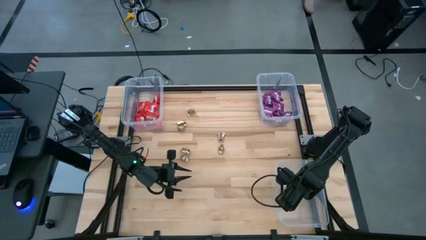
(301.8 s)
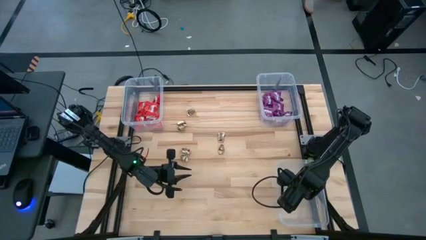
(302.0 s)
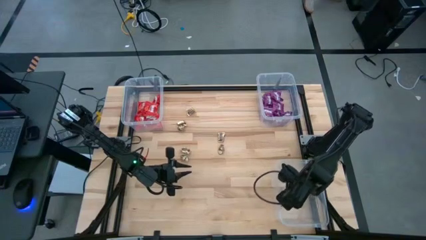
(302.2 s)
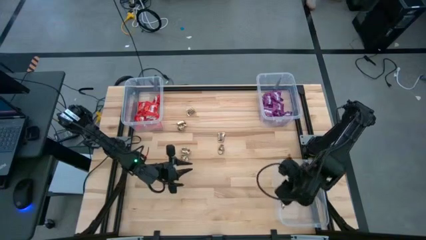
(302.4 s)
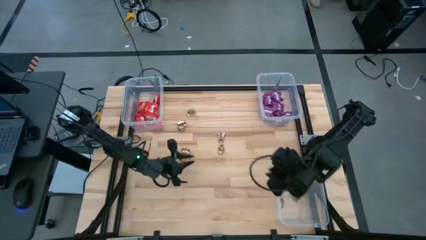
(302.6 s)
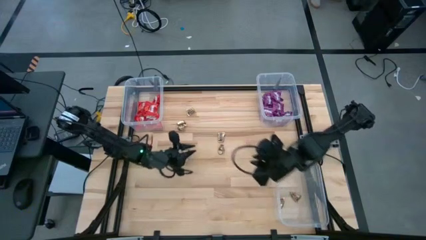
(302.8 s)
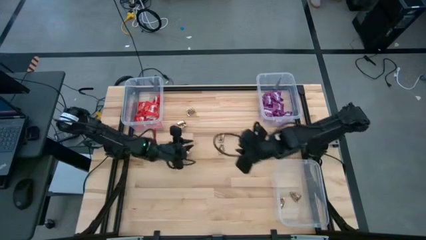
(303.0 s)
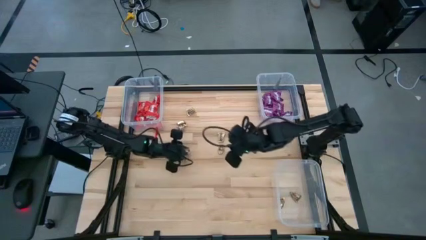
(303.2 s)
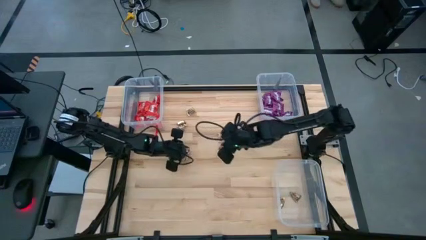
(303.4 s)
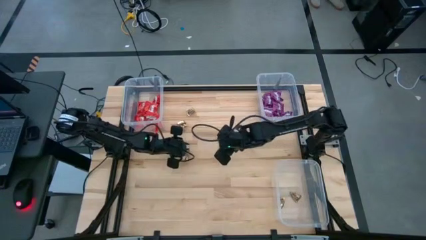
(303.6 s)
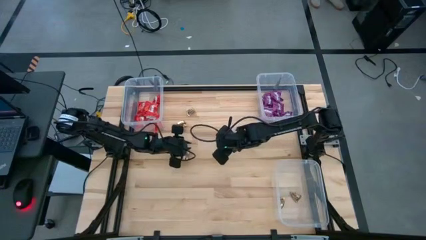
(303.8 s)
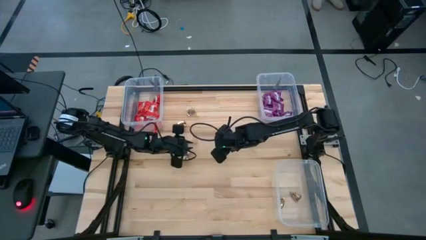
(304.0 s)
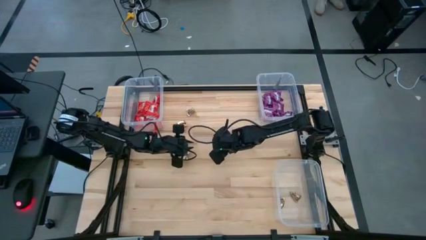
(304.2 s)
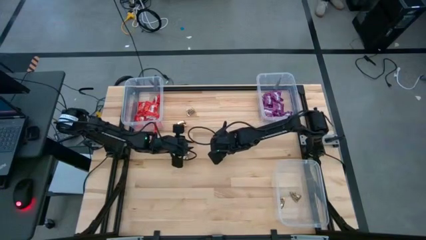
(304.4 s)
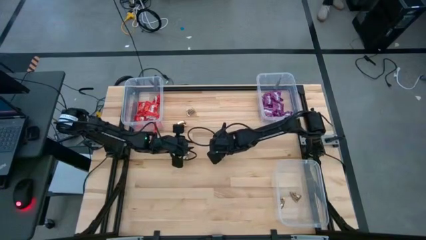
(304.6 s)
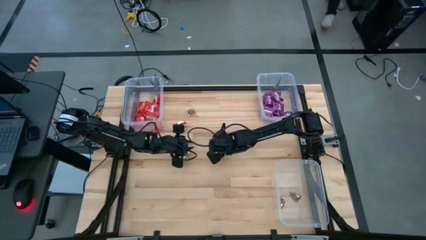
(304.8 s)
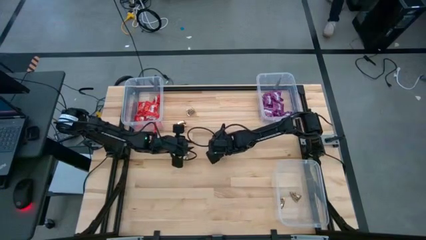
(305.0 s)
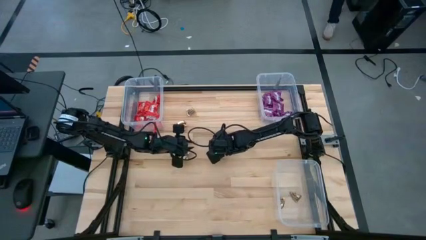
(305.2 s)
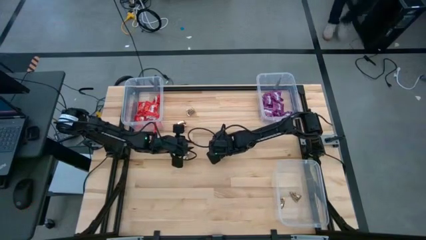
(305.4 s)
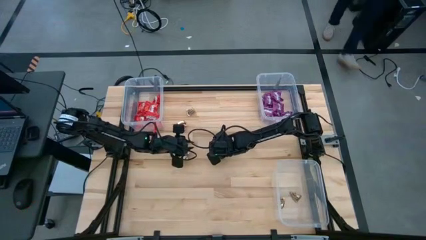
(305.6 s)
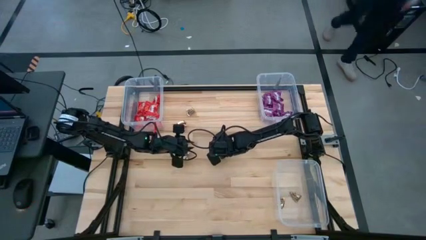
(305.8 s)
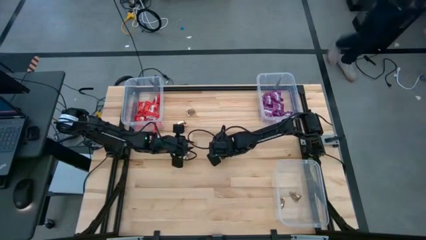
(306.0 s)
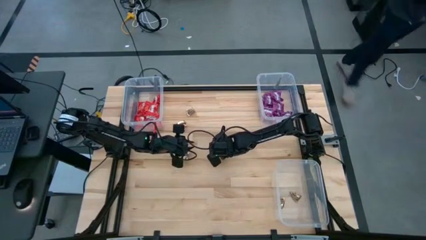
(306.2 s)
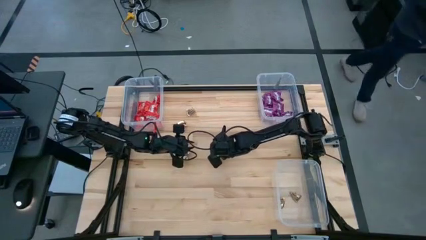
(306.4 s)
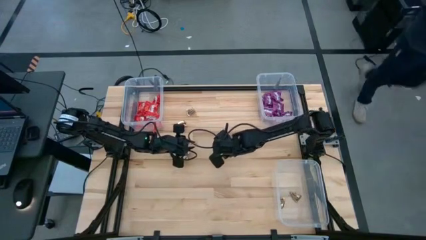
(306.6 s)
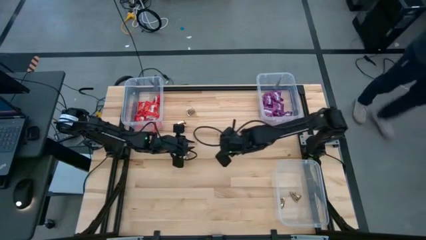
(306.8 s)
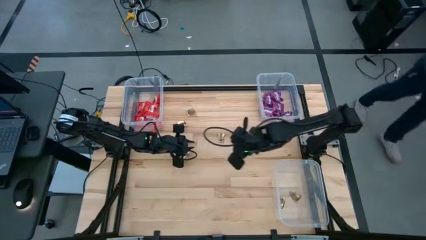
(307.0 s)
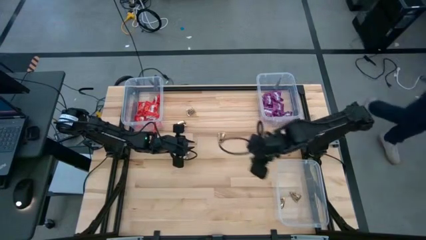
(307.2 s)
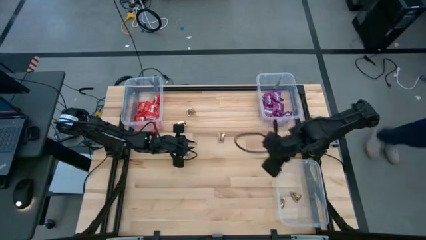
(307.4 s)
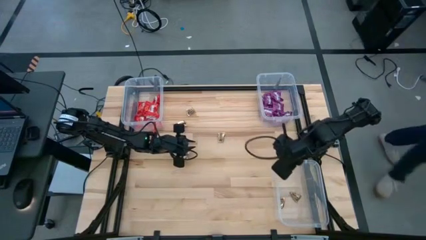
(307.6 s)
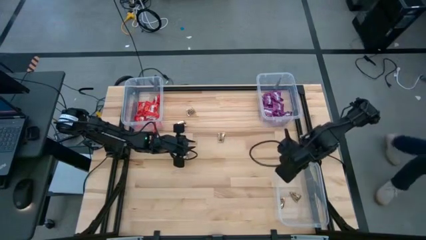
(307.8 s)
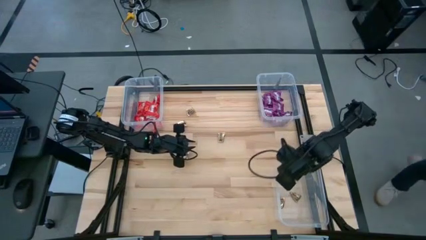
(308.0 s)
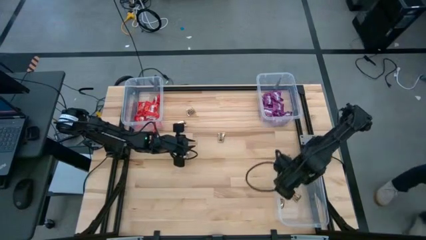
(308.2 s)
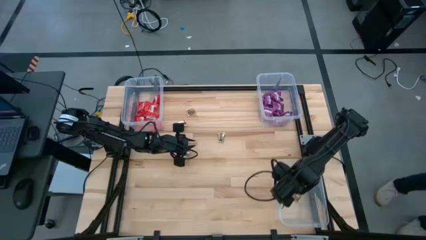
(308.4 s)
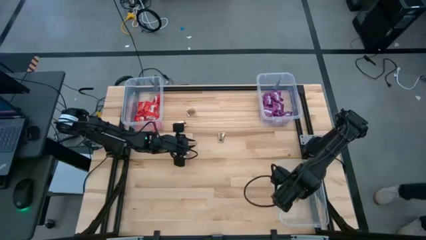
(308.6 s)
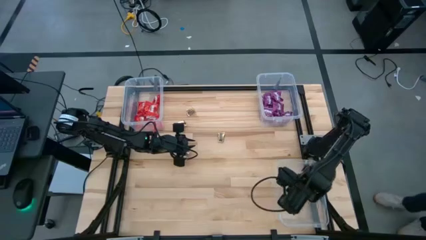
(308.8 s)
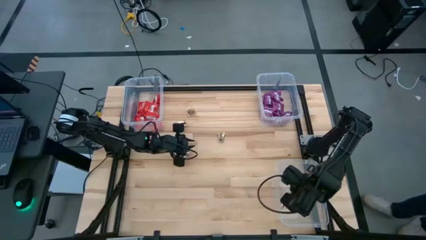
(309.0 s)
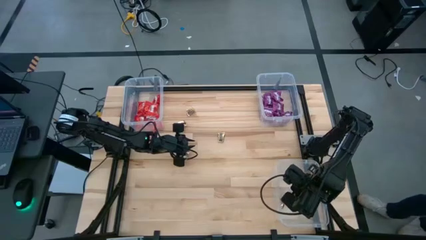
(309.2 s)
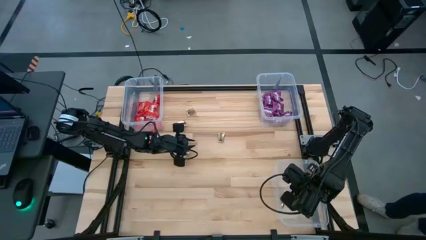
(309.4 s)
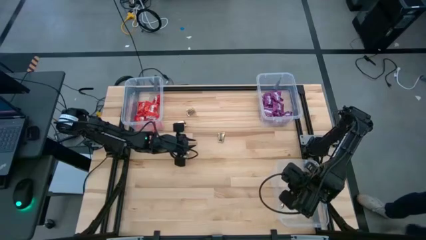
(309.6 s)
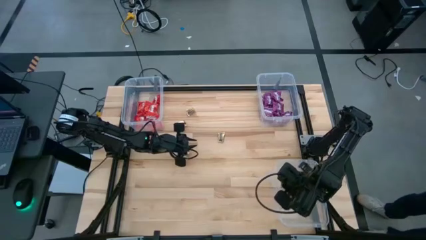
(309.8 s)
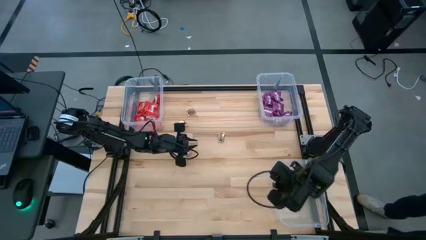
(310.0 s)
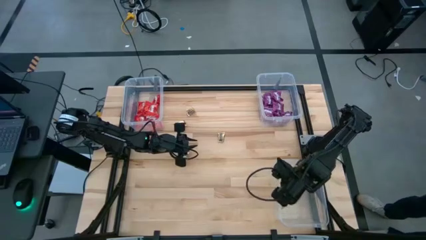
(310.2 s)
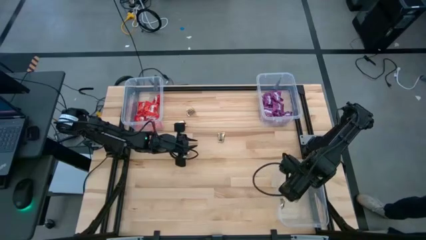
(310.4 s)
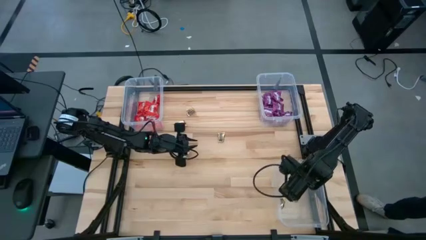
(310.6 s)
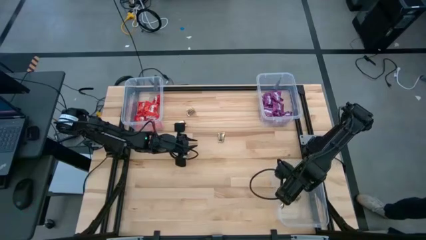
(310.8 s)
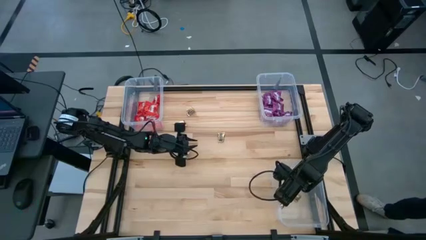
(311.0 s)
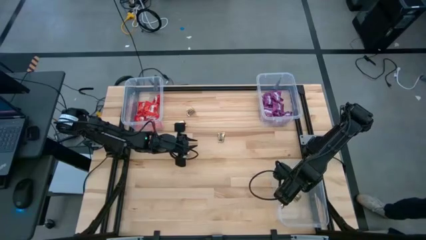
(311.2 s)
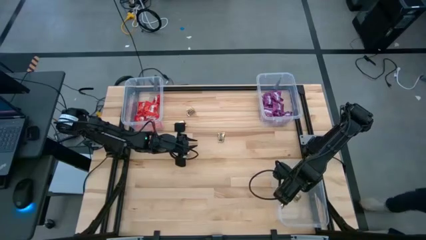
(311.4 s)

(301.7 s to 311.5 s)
Task: Sort candy
Put the yellow candy into the bottom right transparent bin

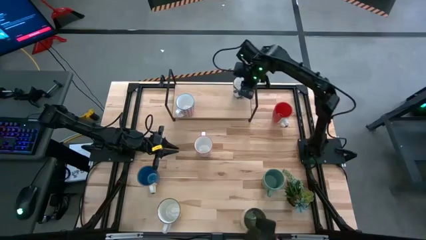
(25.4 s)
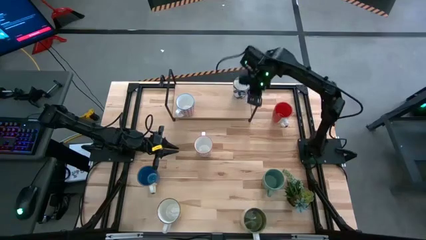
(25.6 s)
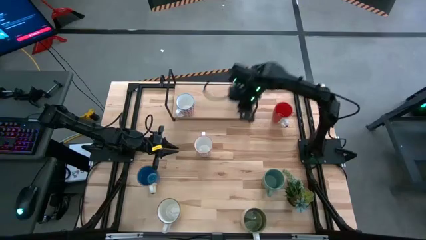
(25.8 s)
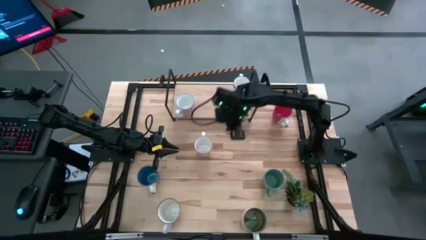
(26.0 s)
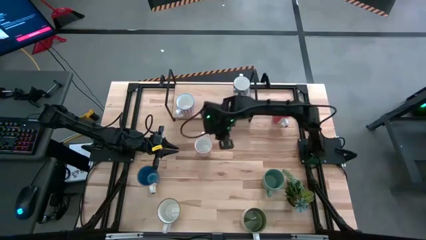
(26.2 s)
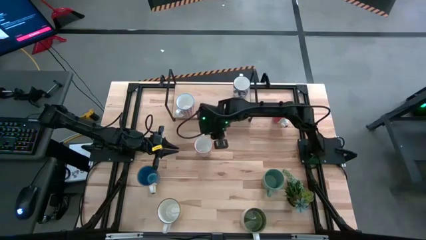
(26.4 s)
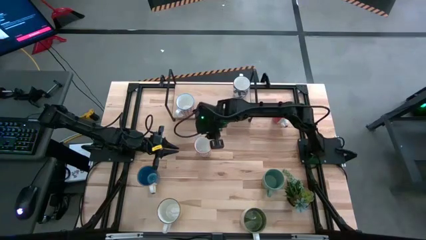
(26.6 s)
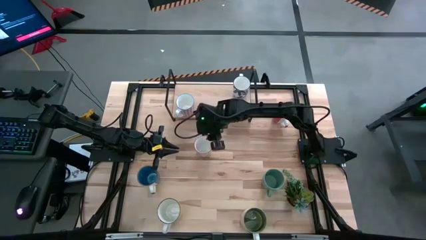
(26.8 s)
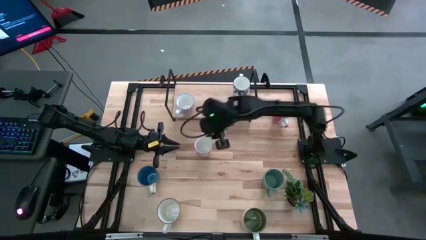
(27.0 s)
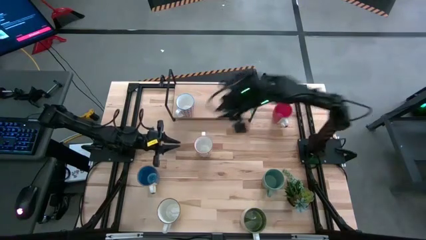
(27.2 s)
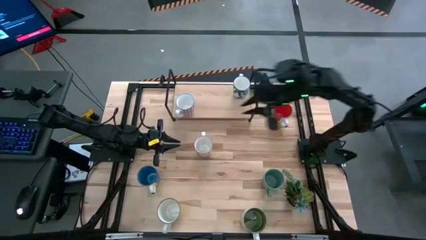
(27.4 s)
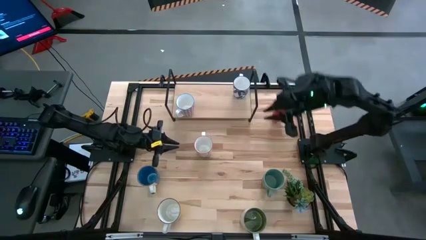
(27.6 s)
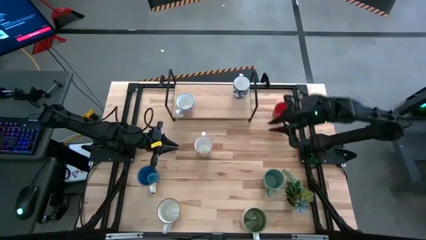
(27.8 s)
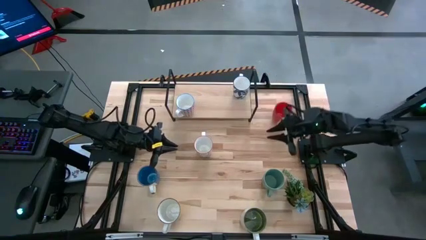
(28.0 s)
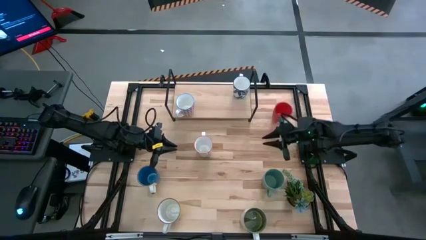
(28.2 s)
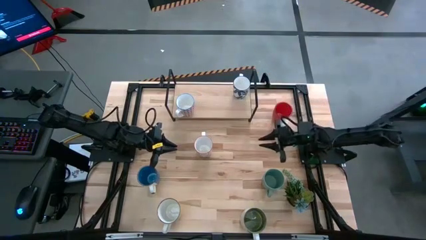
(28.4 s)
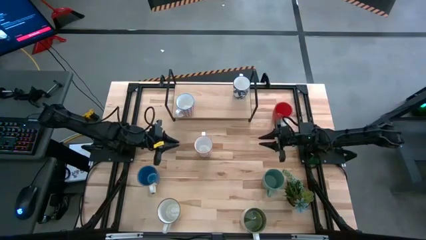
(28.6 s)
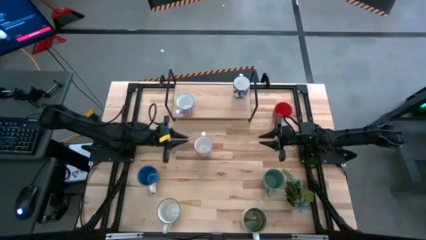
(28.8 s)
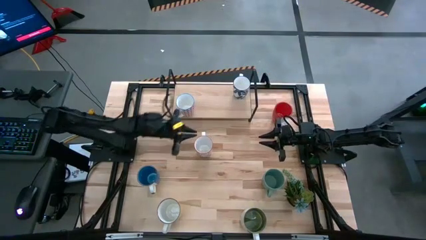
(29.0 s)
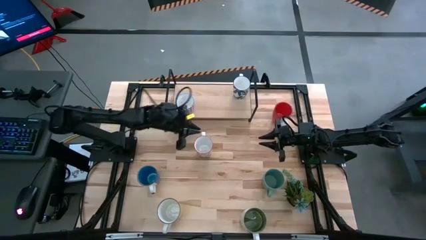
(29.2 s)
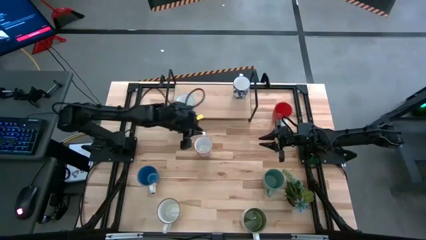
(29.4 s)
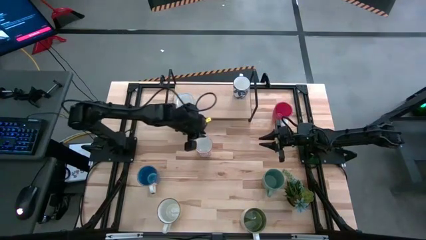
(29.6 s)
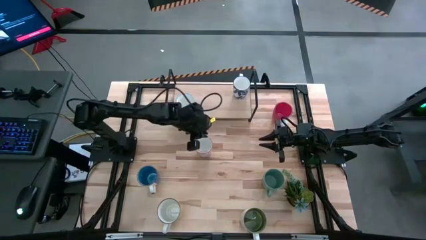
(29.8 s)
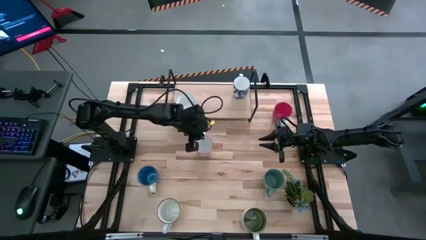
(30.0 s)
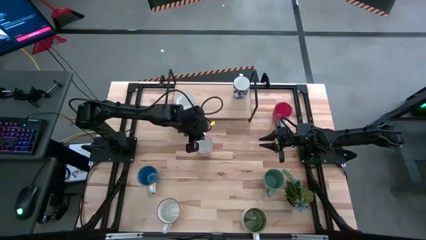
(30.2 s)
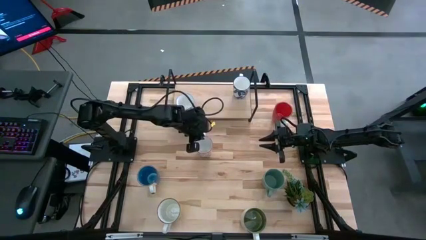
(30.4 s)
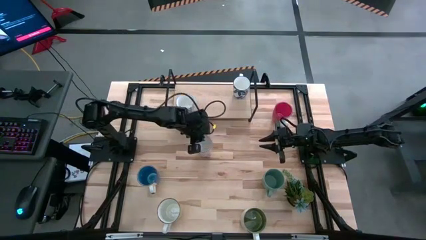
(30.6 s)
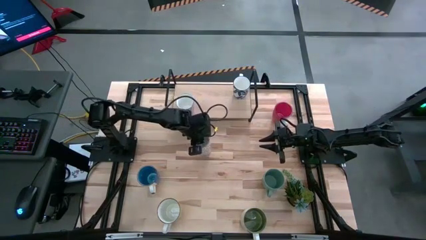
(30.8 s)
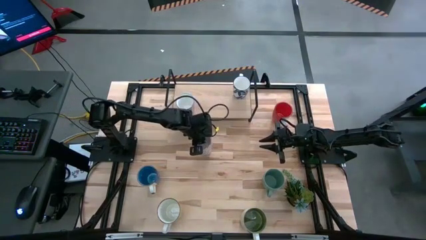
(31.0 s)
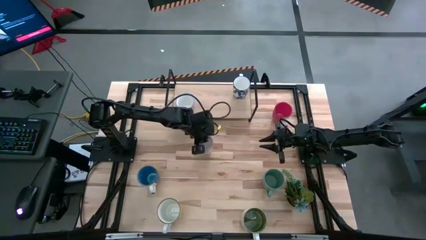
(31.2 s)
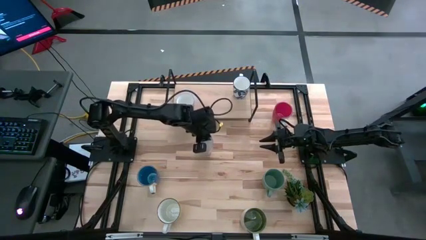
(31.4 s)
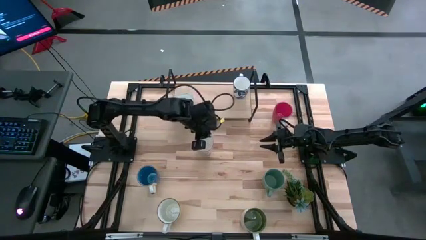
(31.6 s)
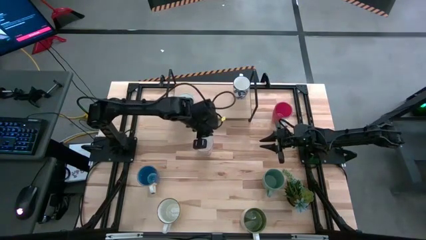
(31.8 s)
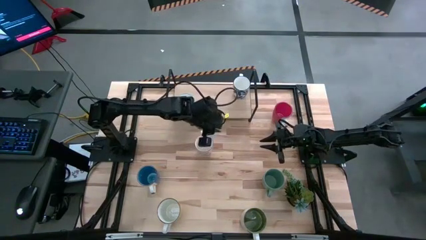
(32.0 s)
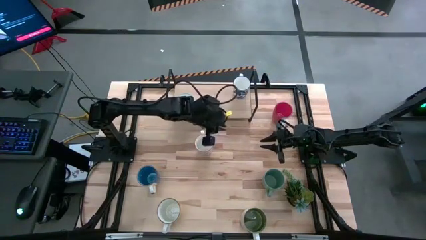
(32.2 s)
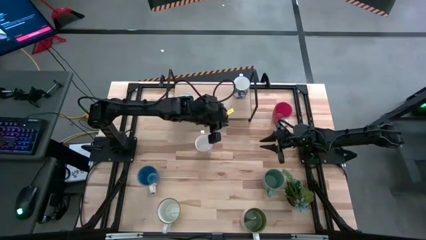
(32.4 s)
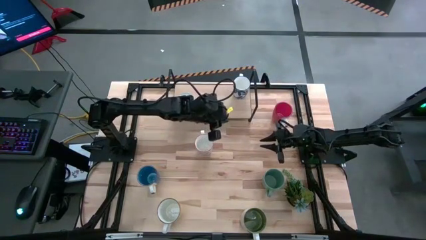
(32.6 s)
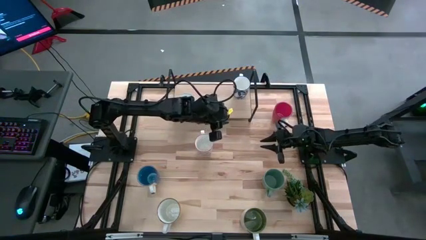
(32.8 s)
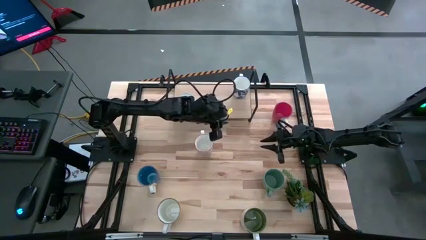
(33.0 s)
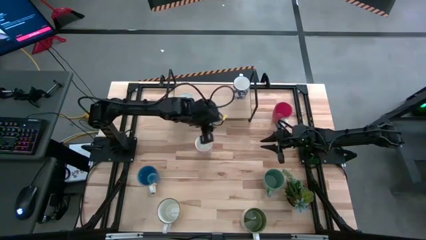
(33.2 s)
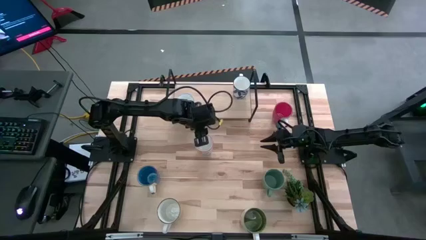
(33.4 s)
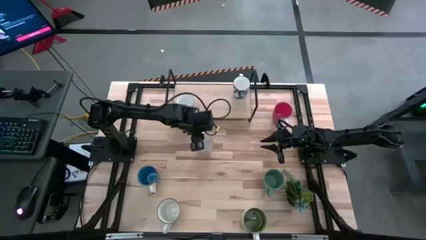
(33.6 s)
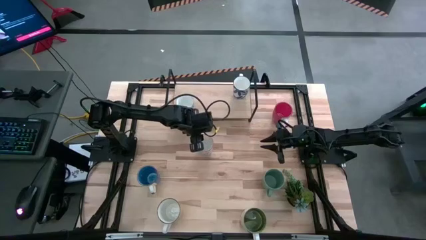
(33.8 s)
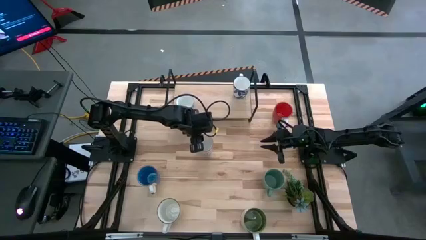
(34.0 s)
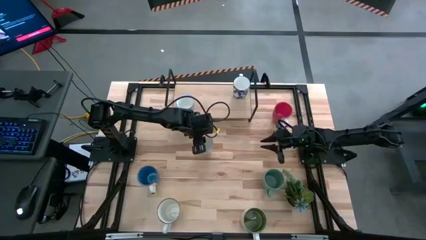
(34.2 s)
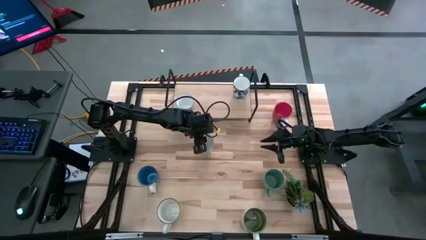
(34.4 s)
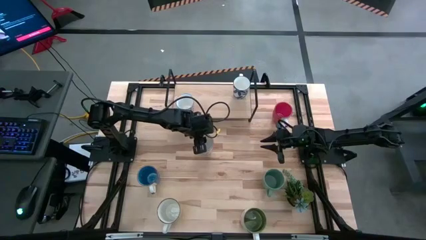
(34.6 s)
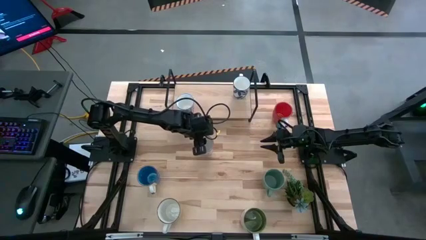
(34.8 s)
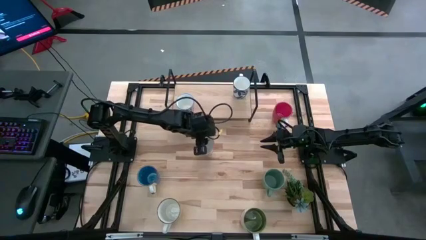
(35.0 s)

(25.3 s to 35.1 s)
Task: Place coffee mugs
Put the gray patterned mug on the shelf
